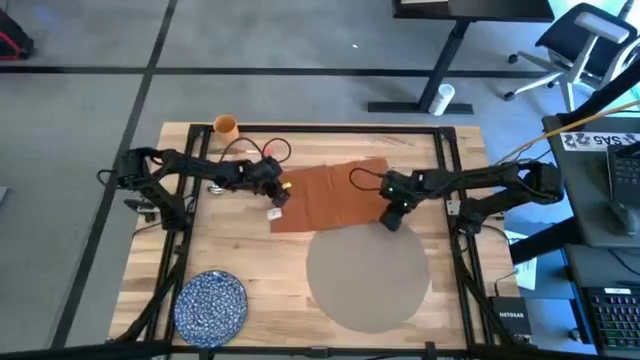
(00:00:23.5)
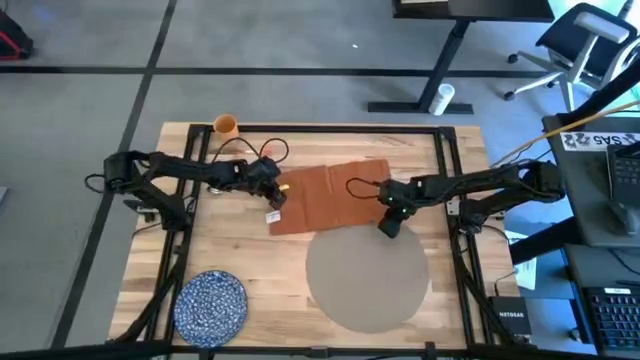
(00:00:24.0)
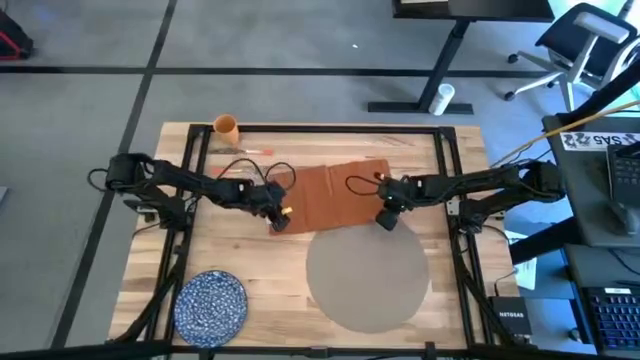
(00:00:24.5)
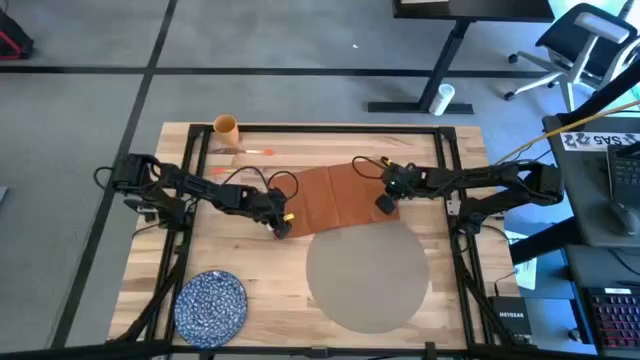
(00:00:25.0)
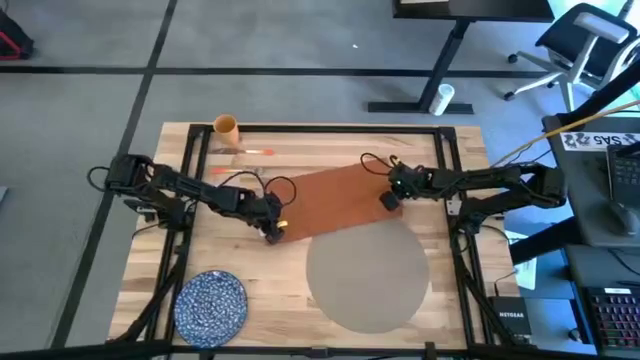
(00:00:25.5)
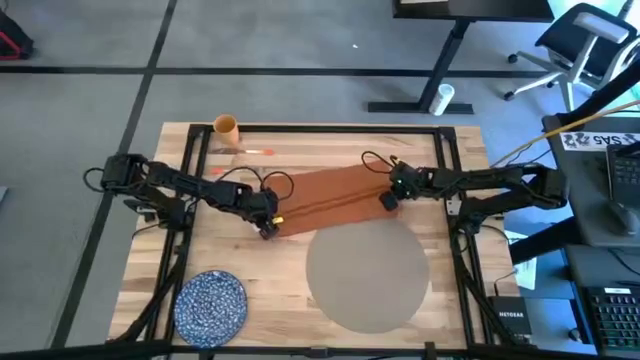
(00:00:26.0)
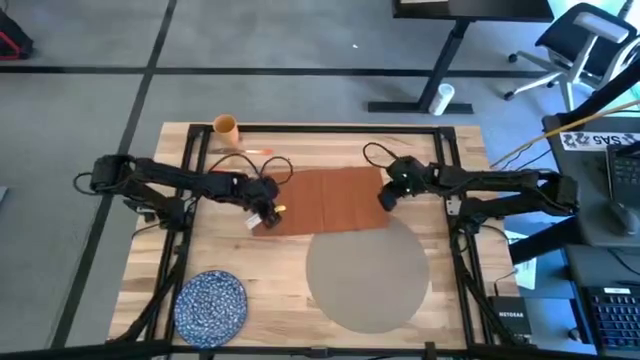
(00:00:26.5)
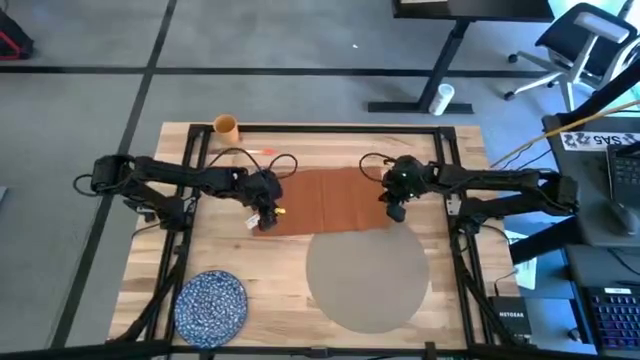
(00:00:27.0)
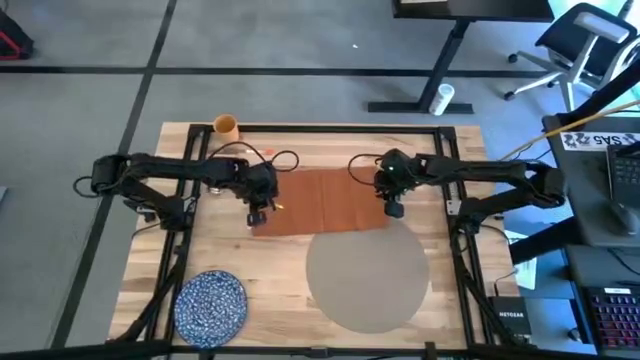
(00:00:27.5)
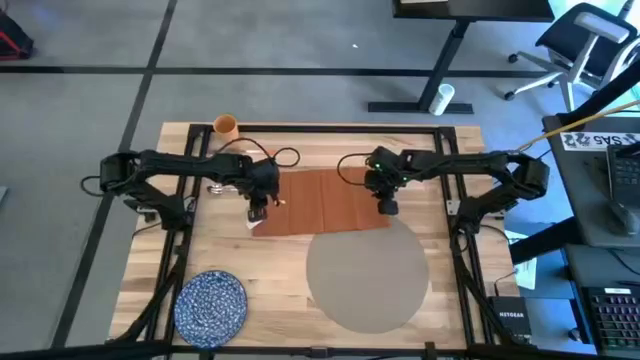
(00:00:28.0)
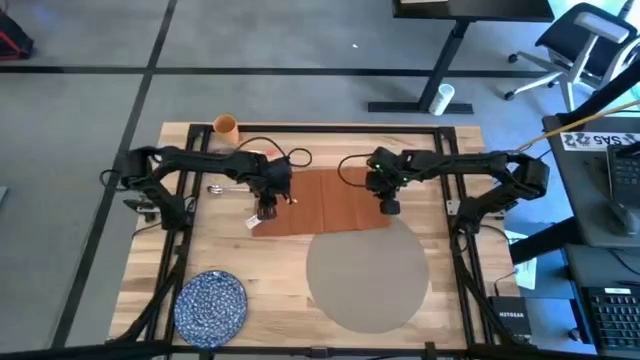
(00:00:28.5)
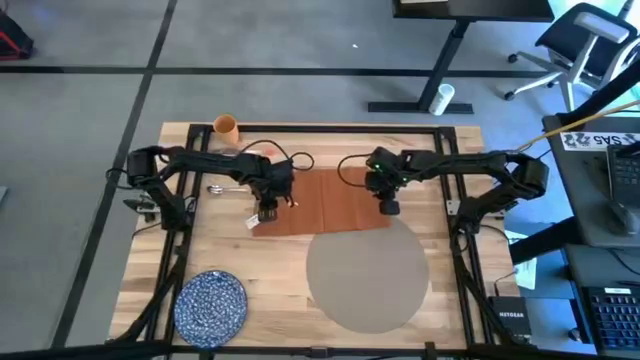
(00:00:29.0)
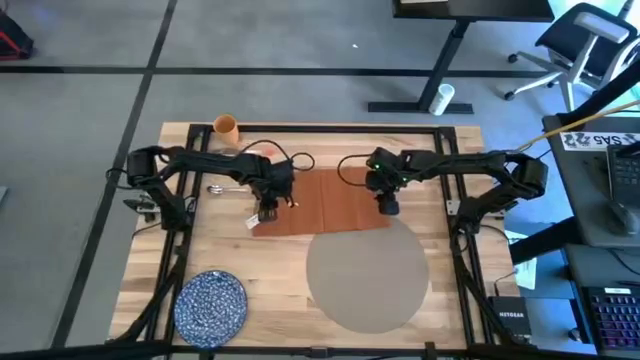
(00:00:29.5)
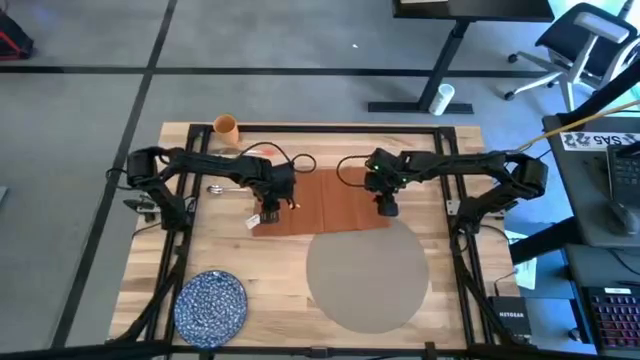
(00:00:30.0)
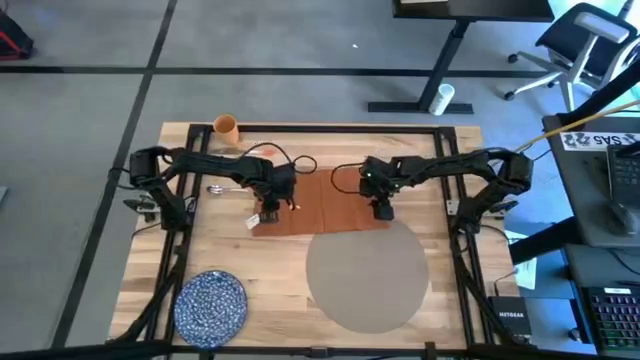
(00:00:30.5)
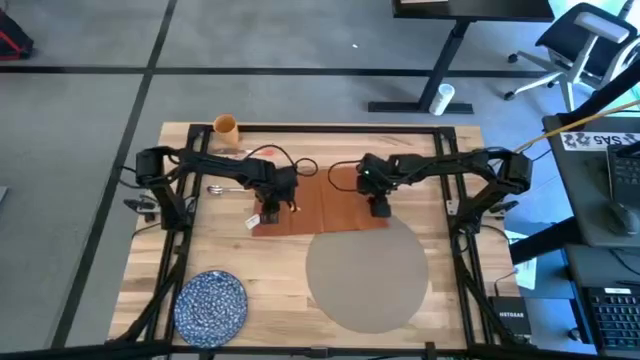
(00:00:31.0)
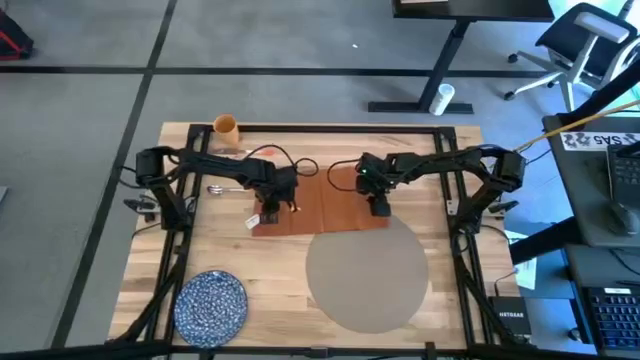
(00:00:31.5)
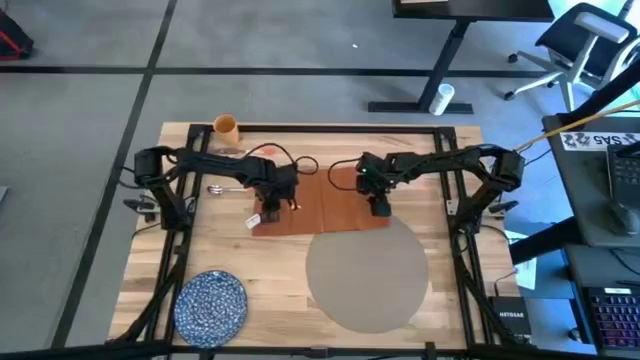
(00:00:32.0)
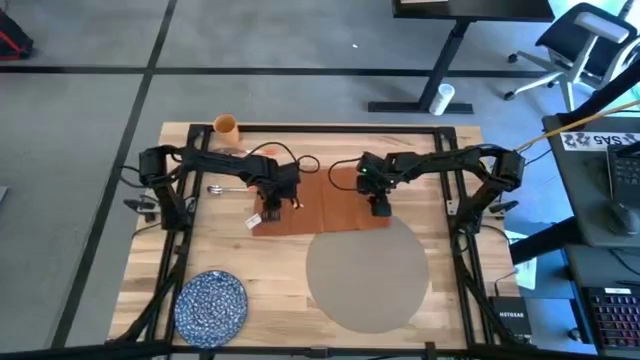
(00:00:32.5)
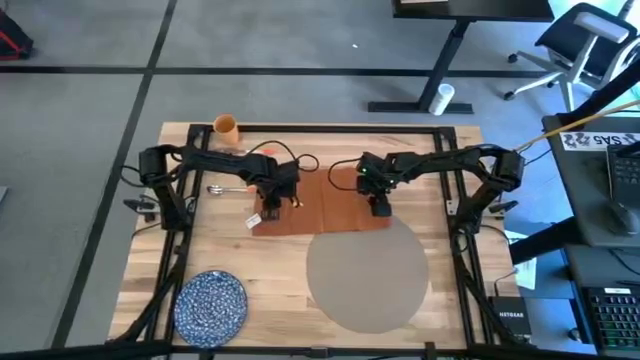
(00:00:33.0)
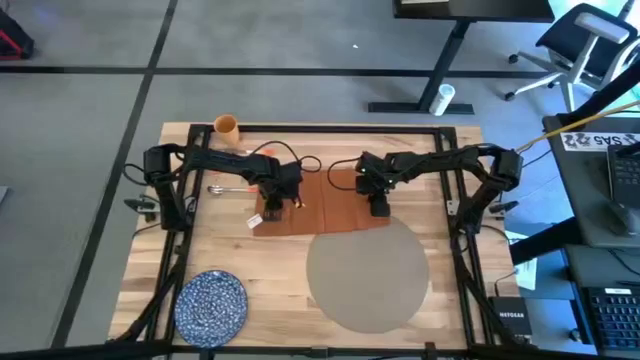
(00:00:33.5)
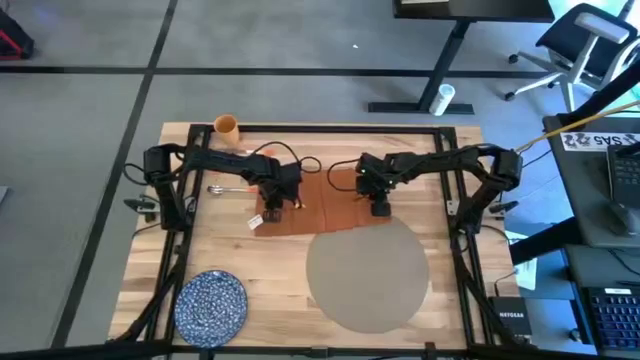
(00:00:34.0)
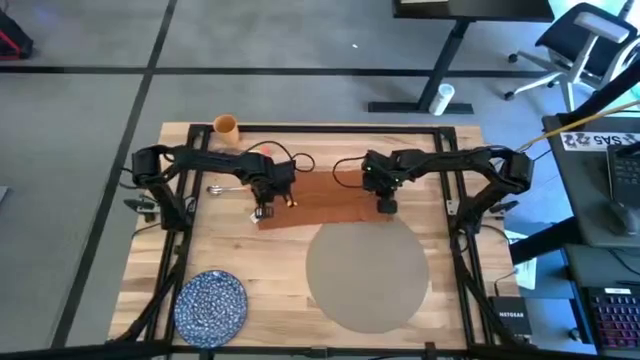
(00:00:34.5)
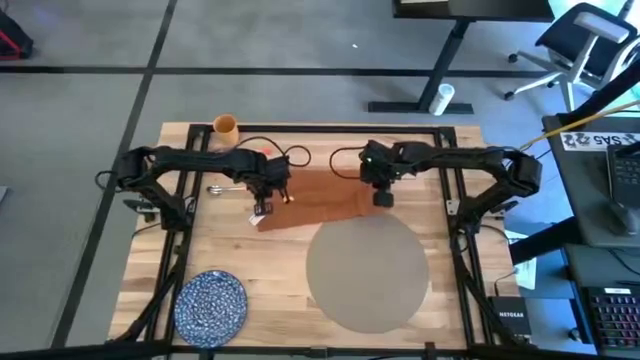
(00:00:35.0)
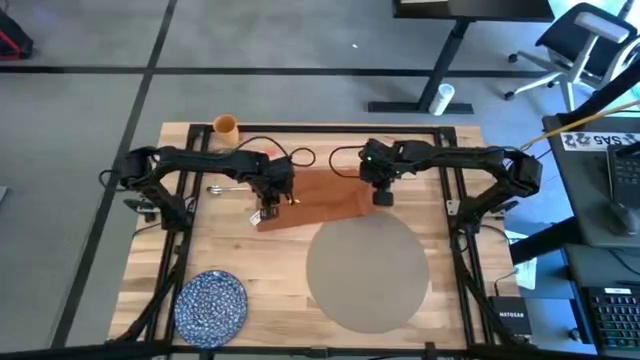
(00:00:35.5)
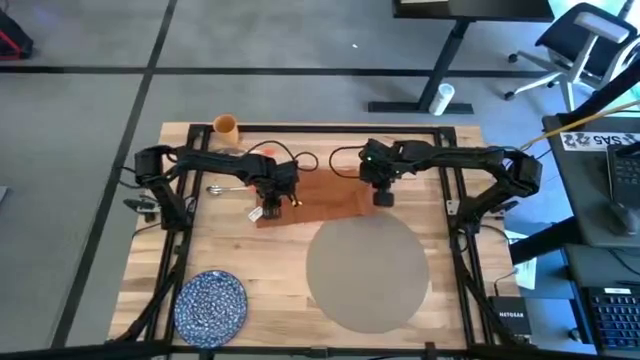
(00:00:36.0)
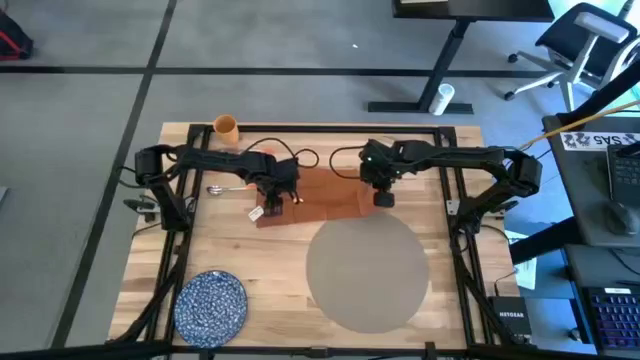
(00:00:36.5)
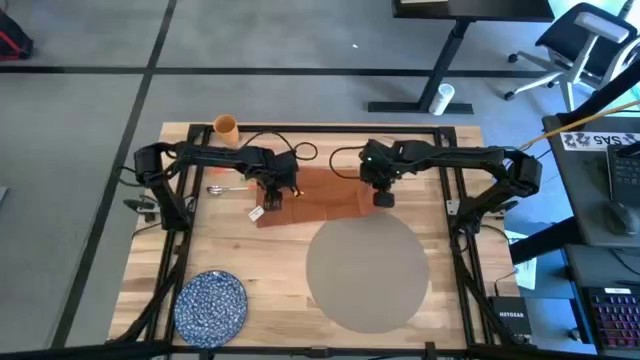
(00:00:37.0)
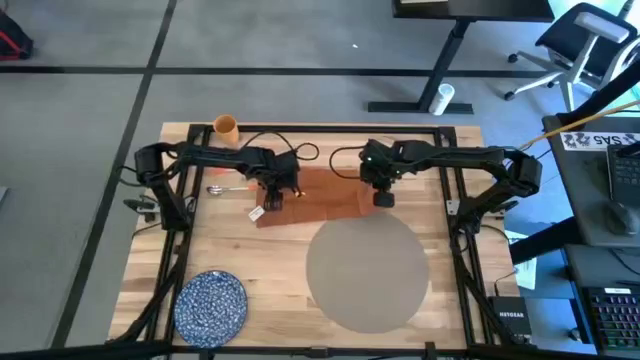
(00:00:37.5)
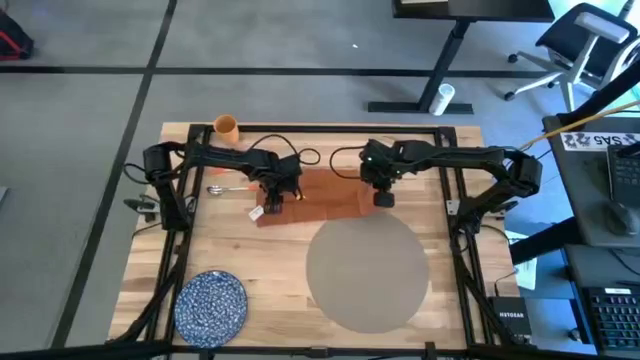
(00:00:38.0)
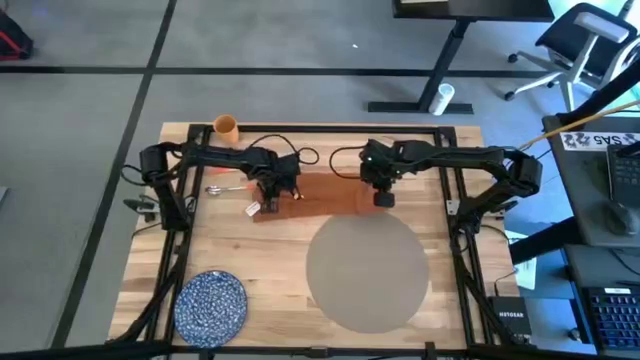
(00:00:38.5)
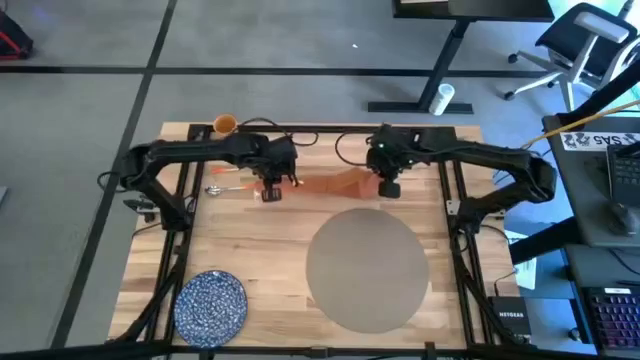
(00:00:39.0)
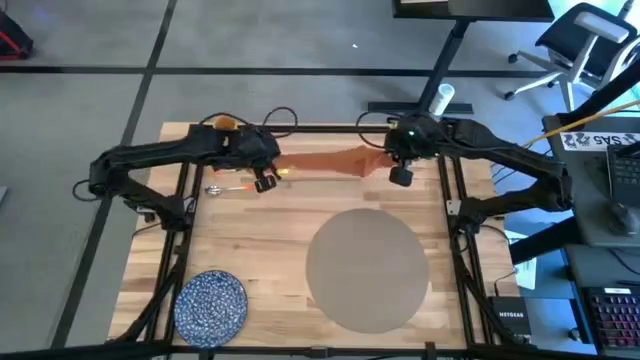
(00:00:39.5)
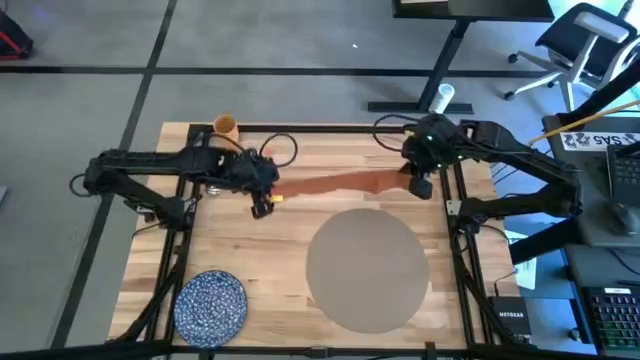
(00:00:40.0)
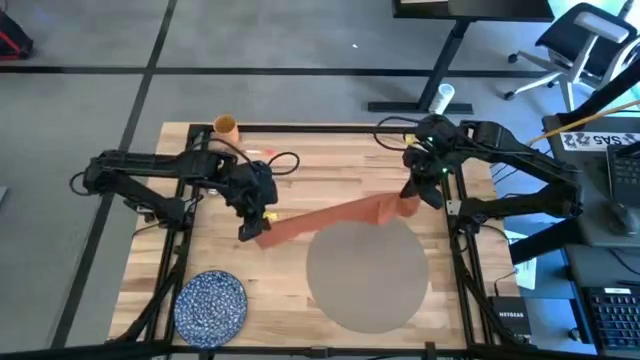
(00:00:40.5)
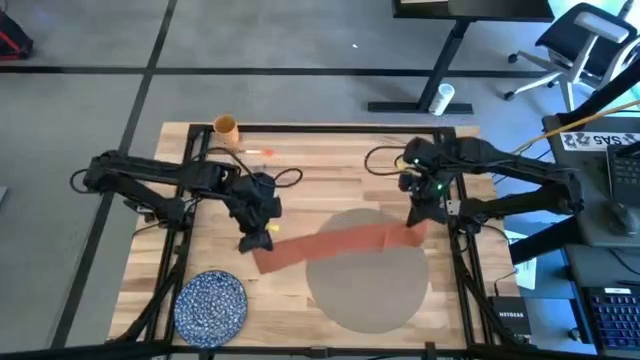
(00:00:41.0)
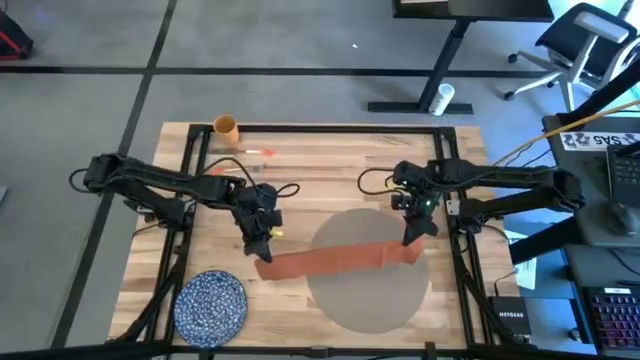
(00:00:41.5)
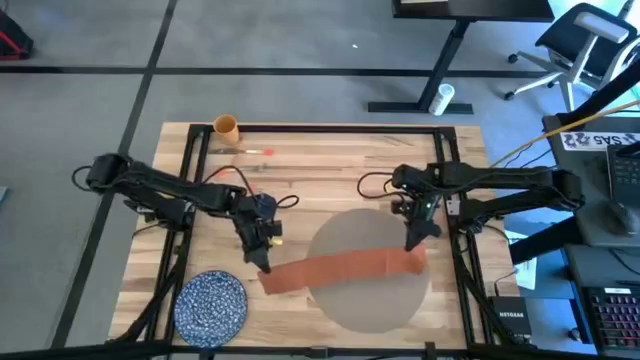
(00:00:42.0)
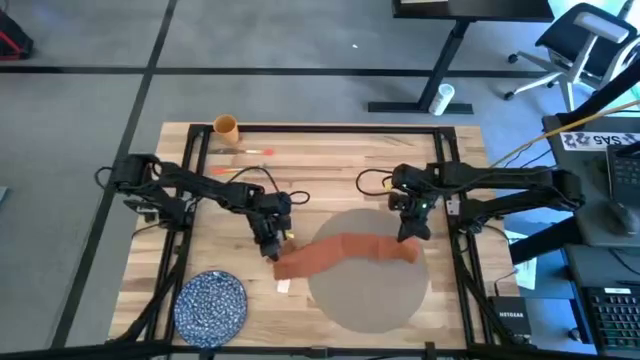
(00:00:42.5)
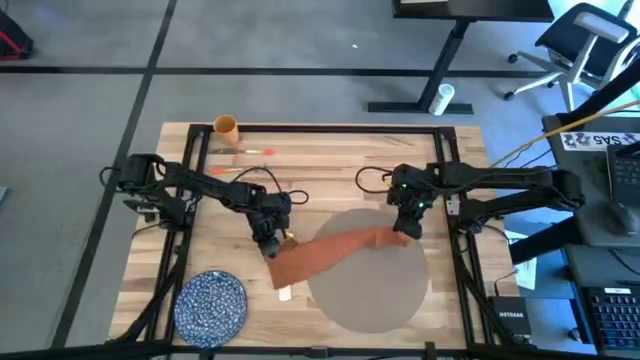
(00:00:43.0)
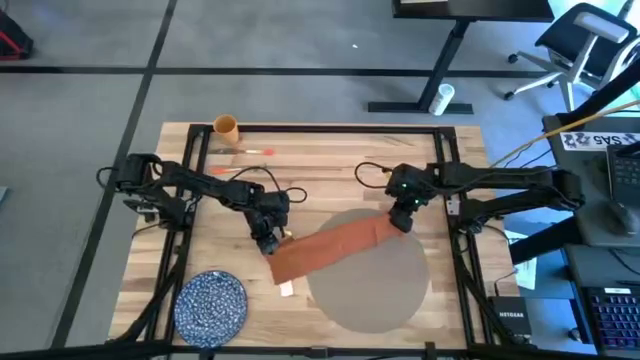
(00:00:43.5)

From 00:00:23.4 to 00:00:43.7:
Task: Set table place
Fold the orange napkin
